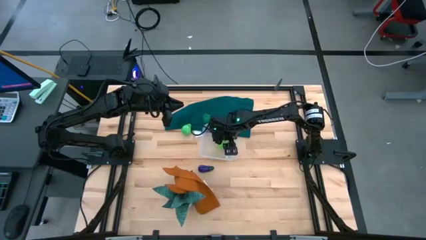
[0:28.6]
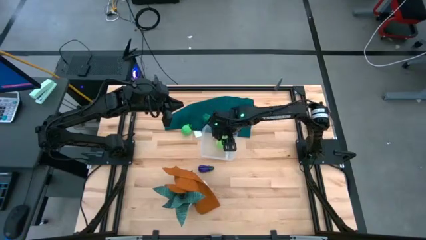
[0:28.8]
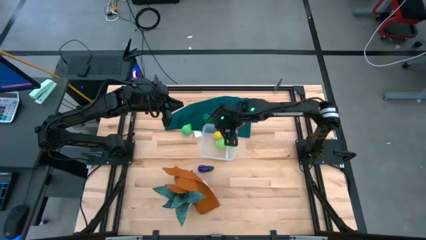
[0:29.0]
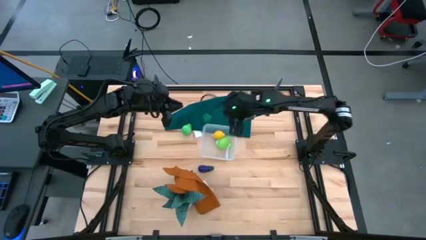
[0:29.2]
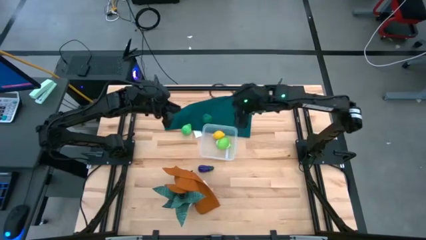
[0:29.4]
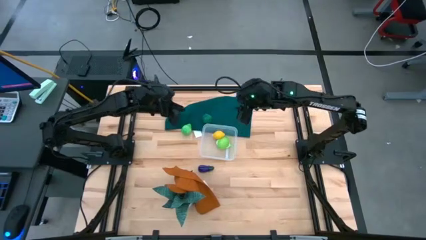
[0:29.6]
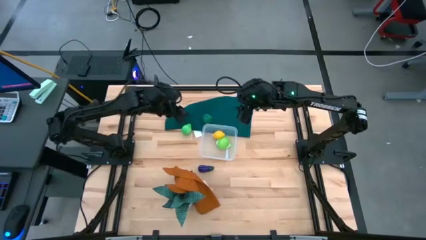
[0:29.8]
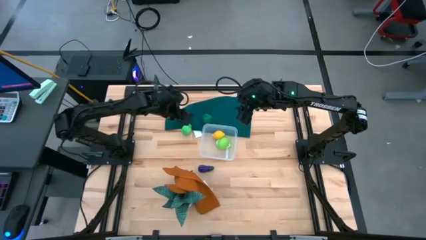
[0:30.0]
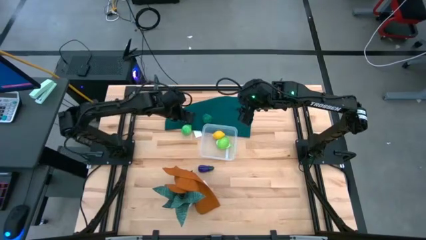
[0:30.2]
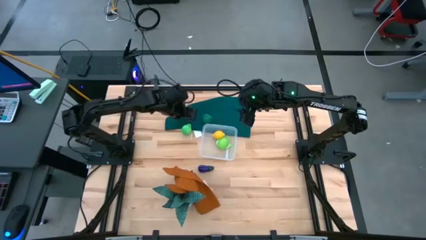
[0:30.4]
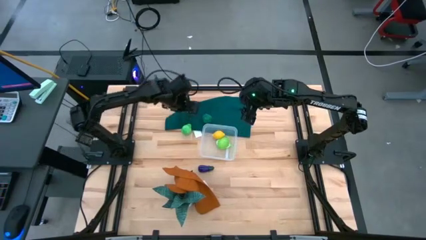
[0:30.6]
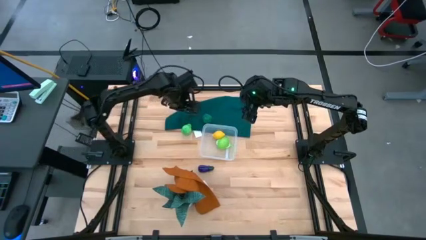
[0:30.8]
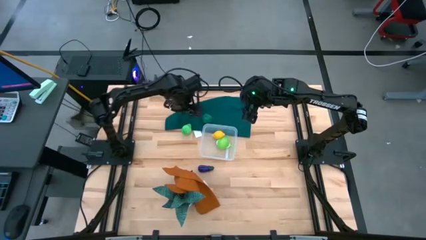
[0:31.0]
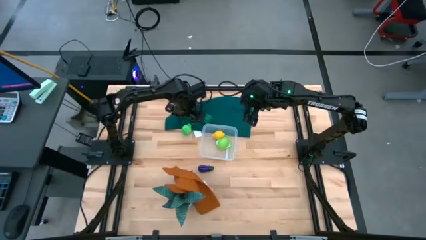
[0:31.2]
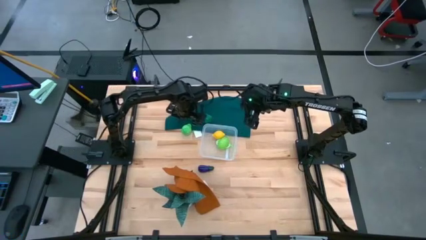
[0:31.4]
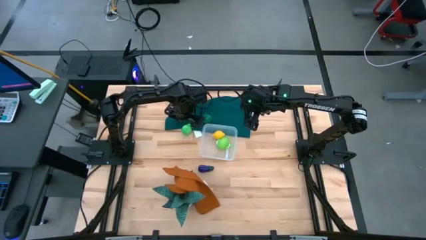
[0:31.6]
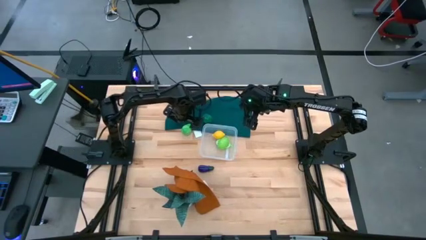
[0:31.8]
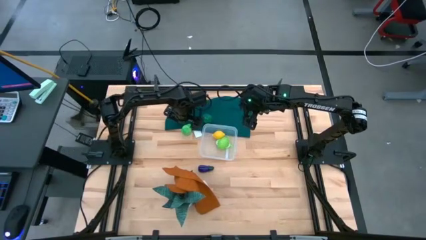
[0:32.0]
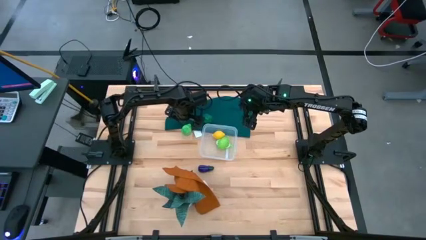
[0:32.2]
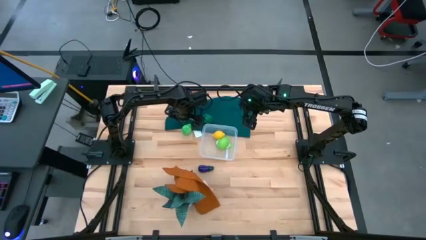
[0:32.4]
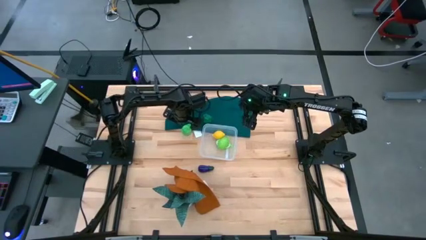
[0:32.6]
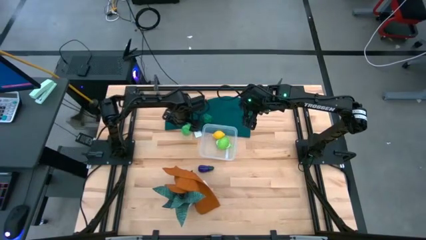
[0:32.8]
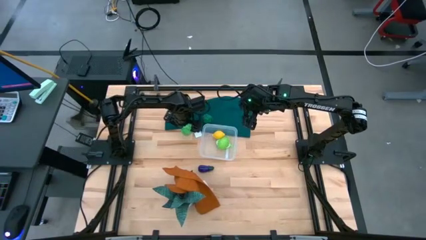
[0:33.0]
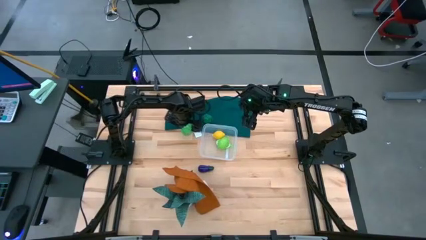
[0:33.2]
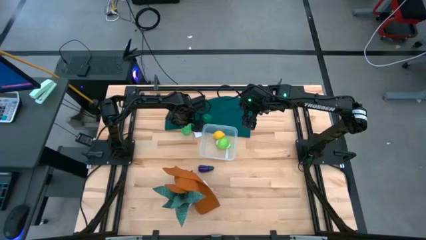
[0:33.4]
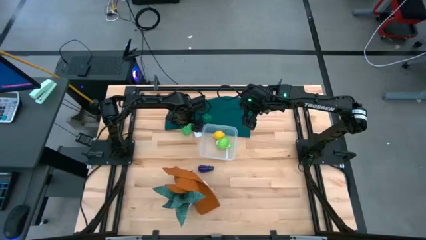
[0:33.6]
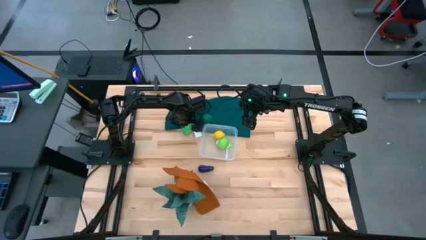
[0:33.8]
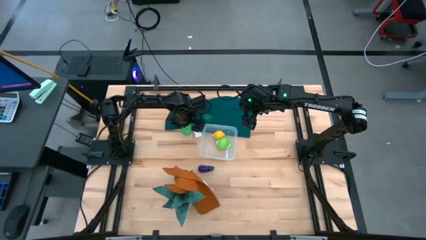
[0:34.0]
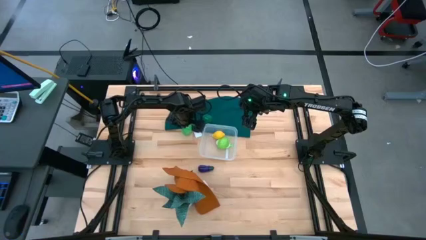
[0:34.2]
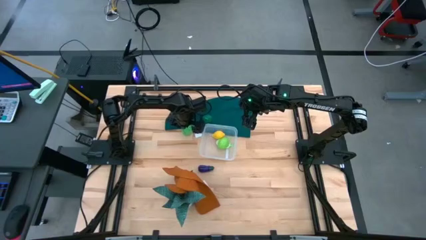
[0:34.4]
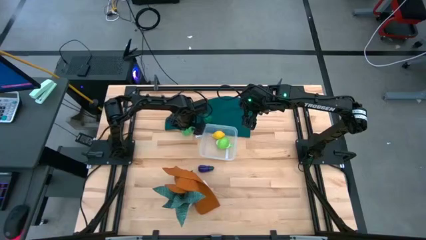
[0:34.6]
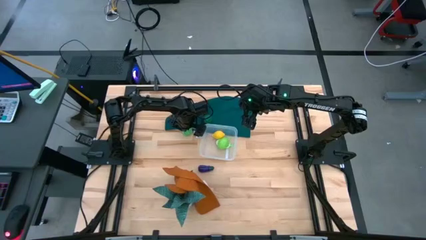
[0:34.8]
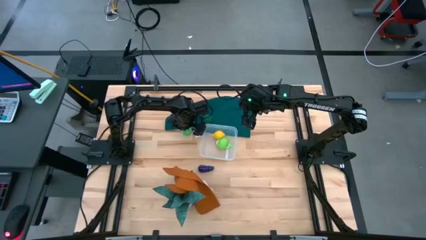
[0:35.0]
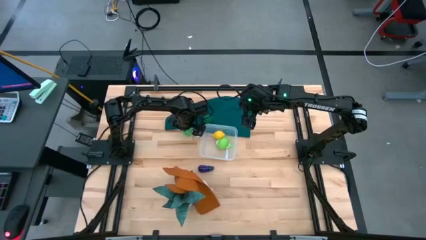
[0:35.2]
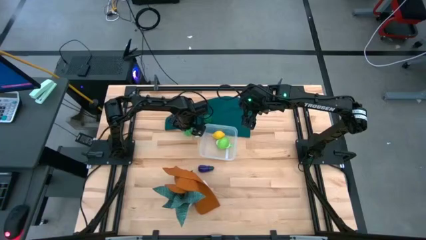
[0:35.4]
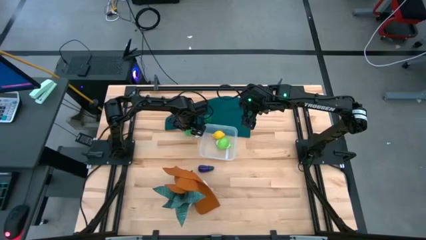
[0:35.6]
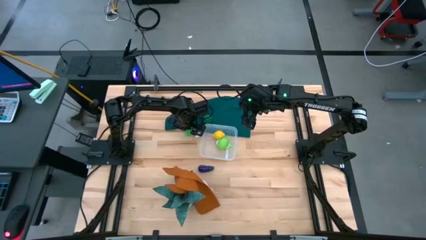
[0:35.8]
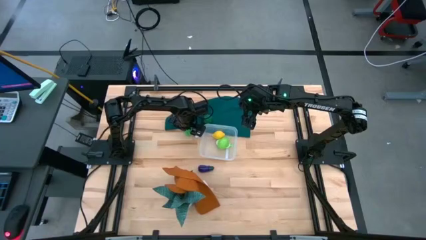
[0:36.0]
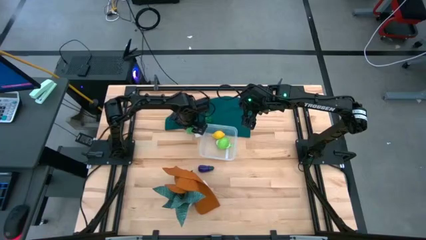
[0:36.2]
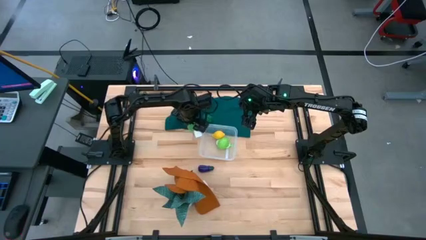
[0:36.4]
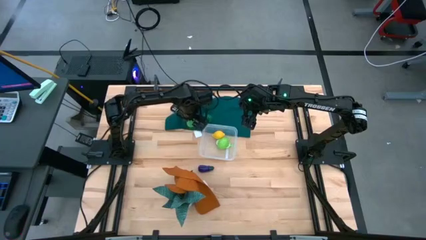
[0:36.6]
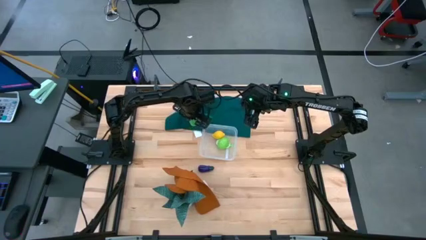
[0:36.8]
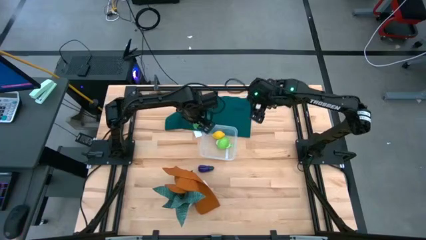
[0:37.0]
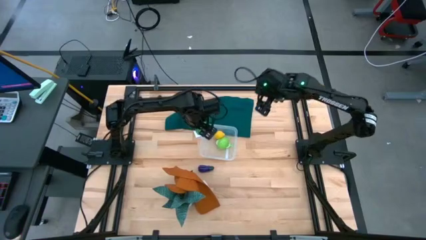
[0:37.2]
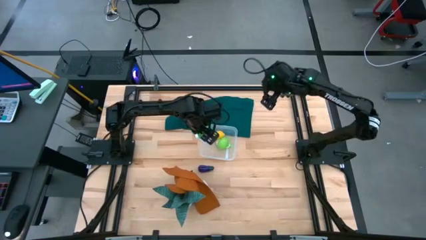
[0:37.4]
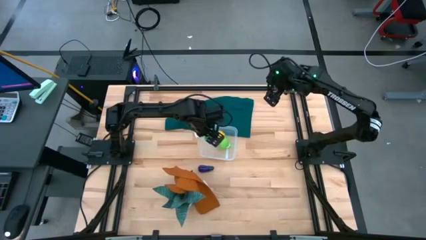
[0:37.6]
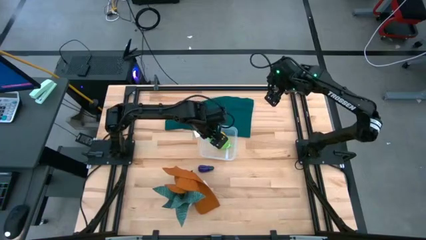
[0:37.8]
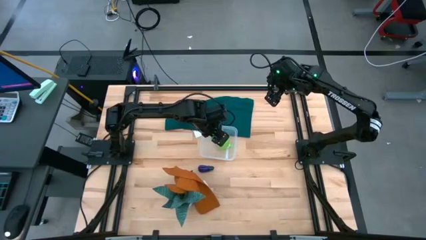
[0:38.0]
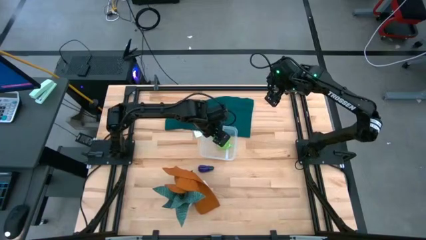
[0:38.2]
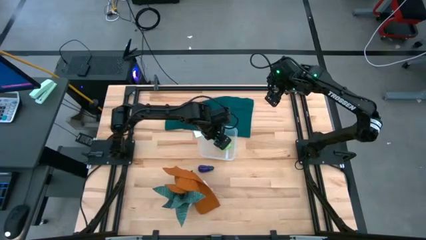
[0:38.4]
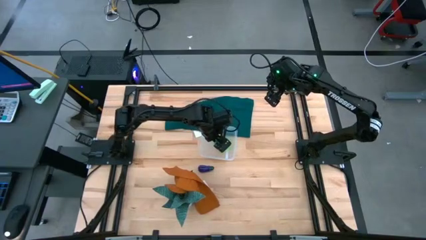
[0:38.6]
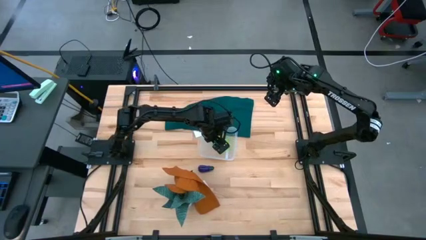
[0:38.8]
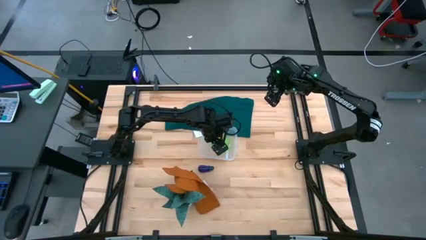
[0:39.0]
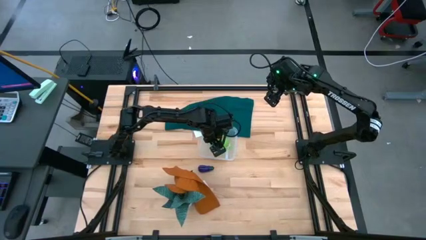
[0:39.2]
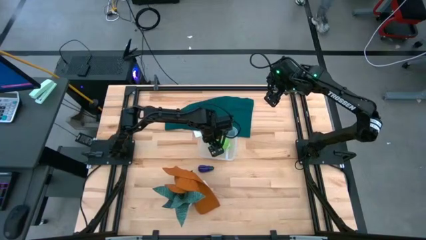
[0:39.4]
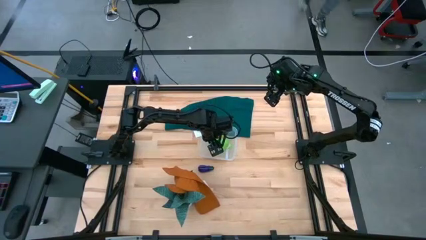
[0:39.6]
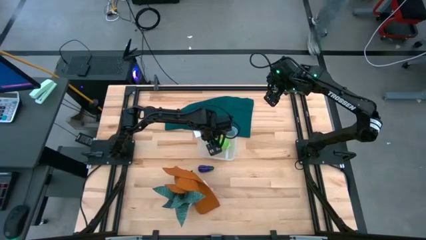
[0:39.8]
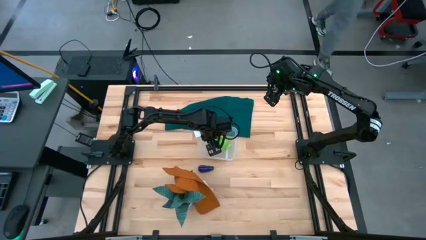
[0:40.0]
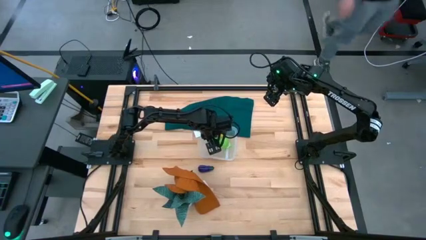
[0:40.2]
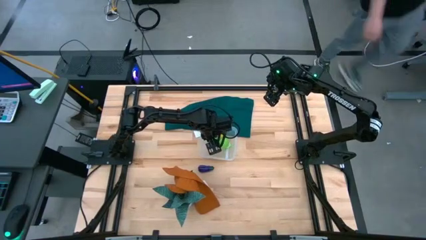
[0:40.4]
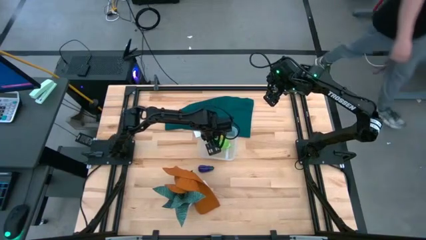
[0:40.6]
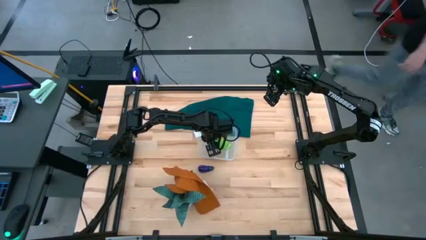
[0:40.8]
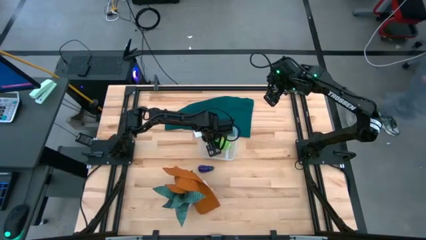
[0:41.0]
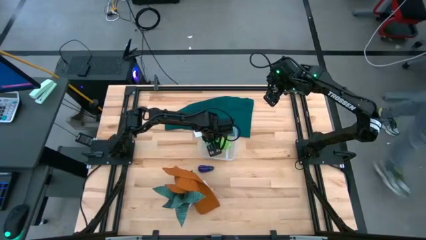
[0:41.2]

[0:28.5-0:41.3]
Task: Pick and placing Produce into tupperware
Put the avocado into the bin
